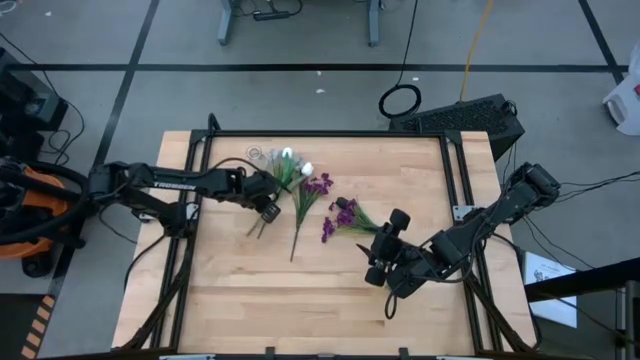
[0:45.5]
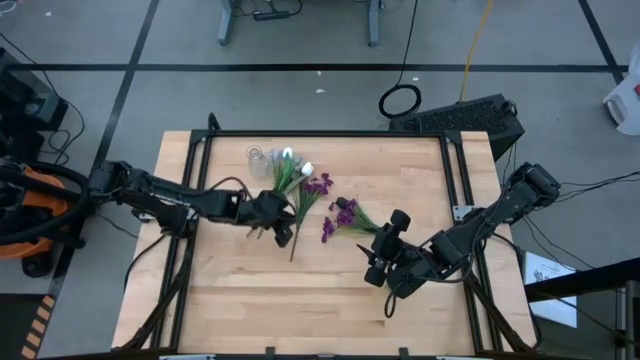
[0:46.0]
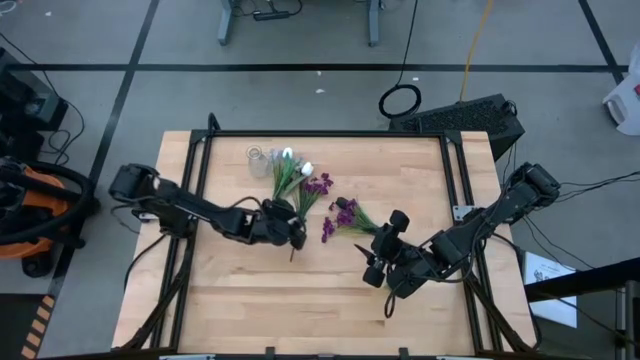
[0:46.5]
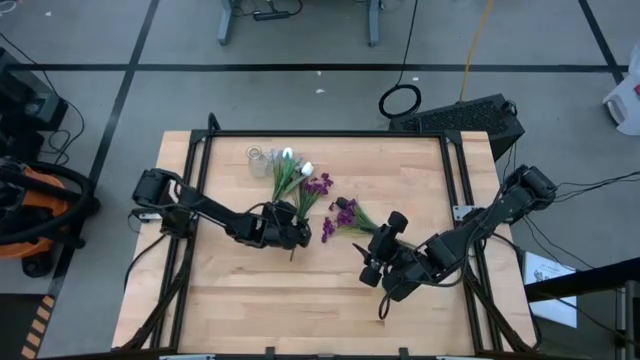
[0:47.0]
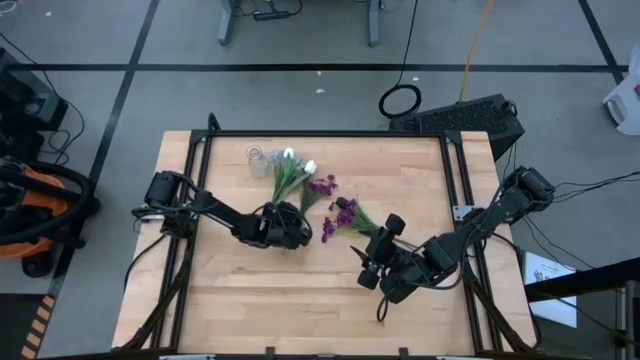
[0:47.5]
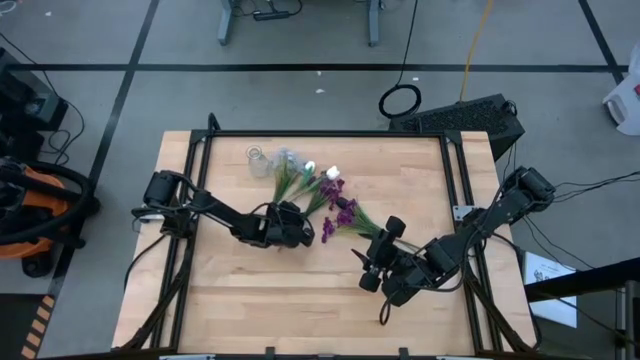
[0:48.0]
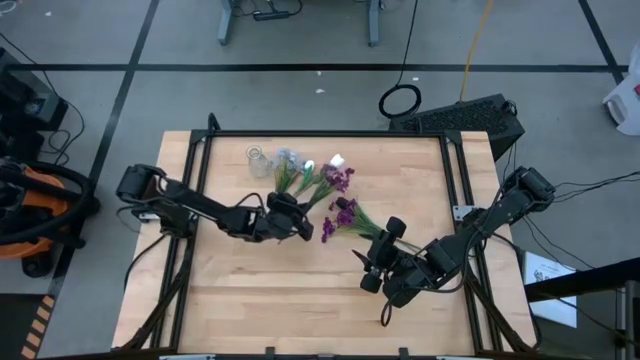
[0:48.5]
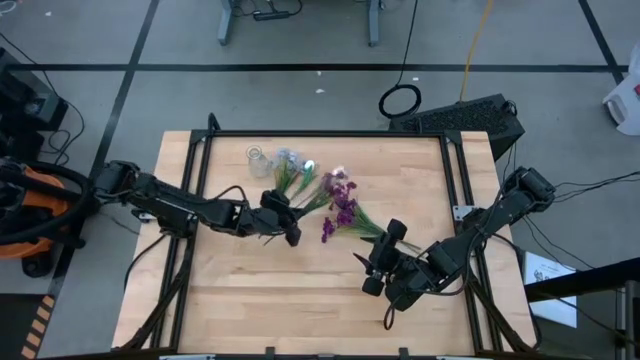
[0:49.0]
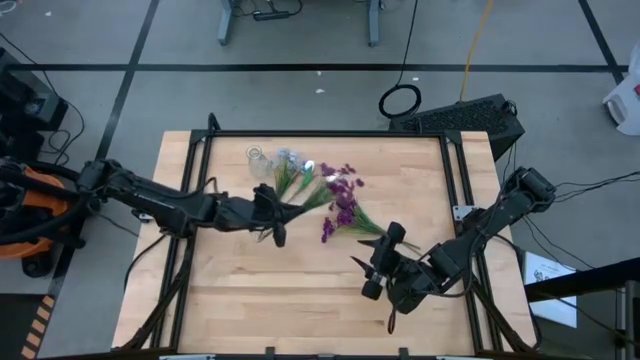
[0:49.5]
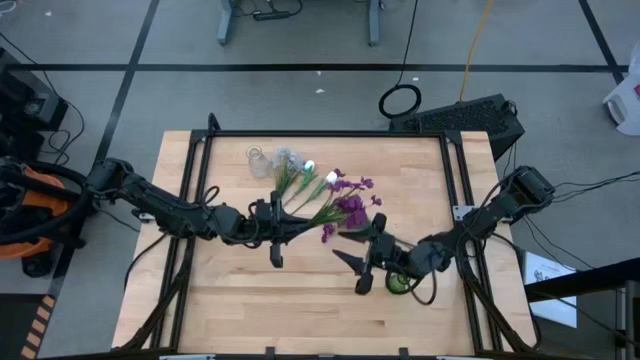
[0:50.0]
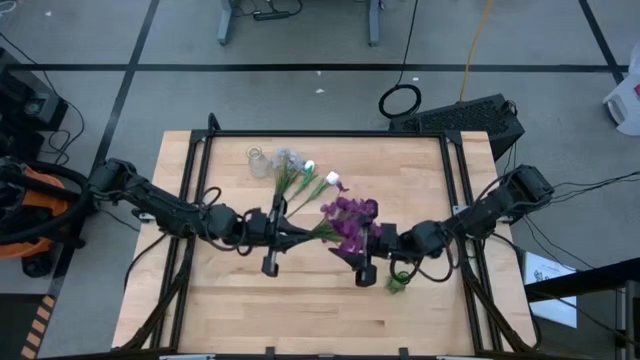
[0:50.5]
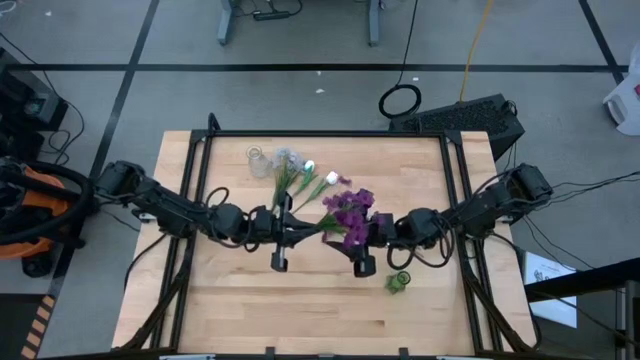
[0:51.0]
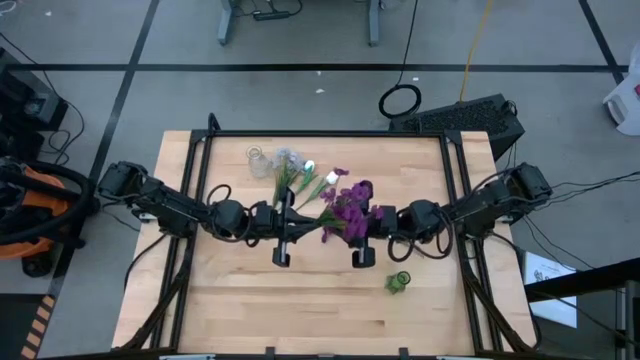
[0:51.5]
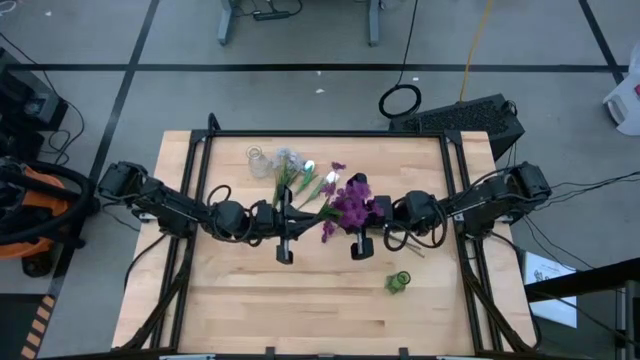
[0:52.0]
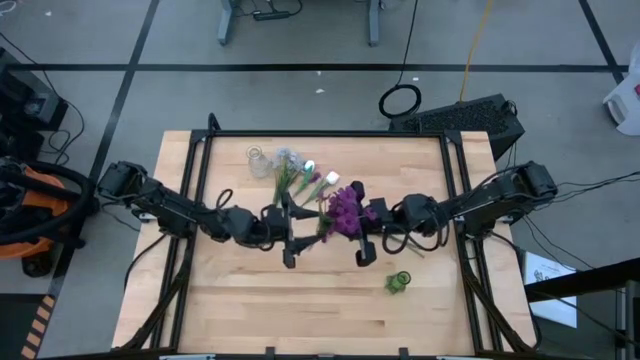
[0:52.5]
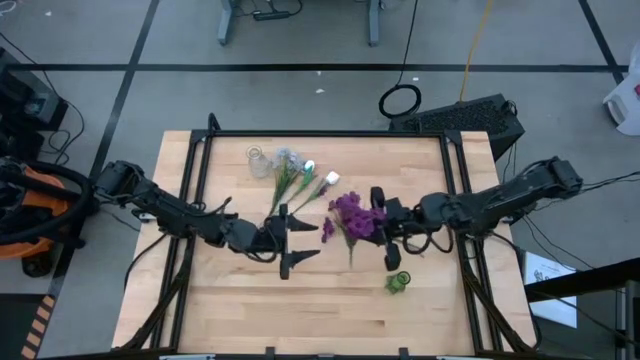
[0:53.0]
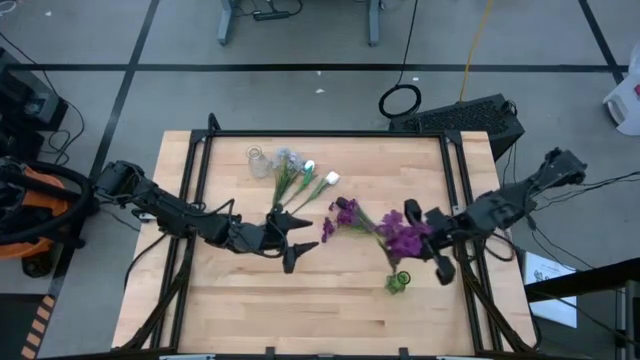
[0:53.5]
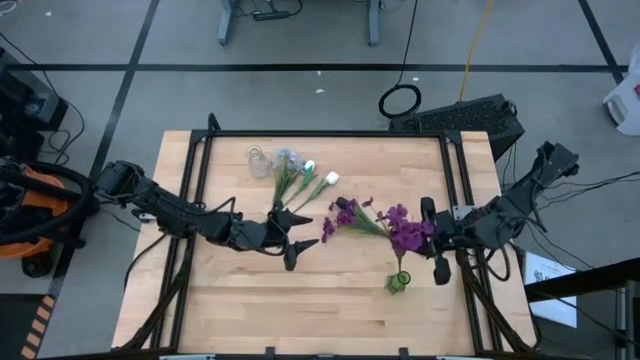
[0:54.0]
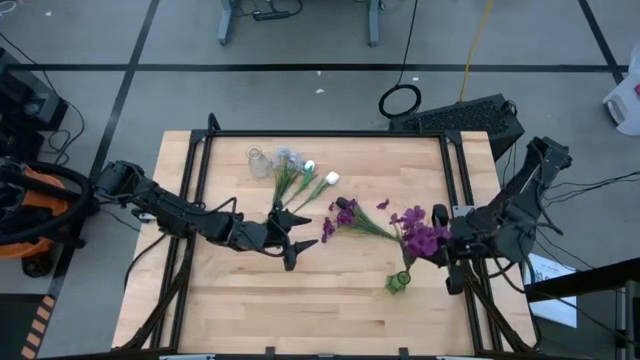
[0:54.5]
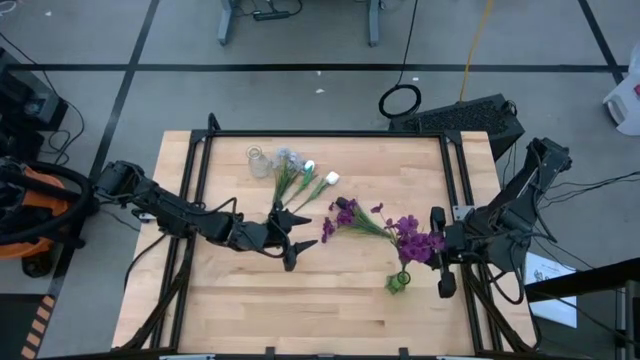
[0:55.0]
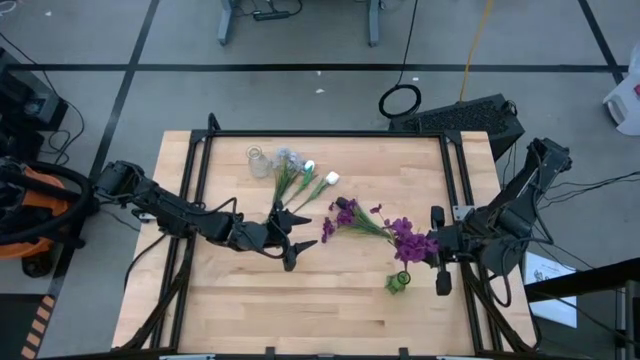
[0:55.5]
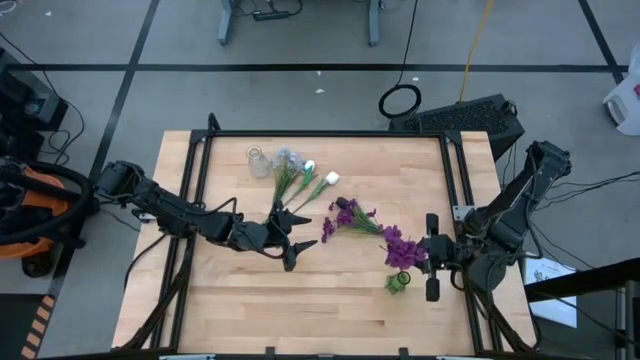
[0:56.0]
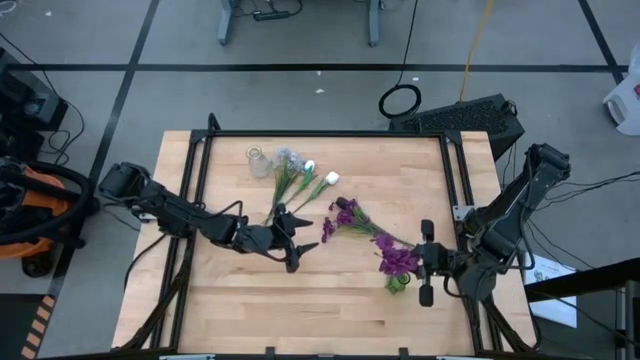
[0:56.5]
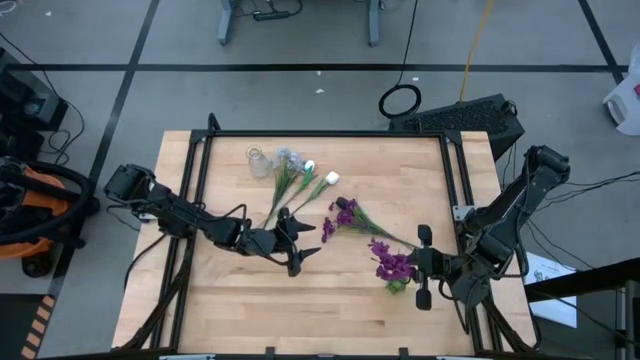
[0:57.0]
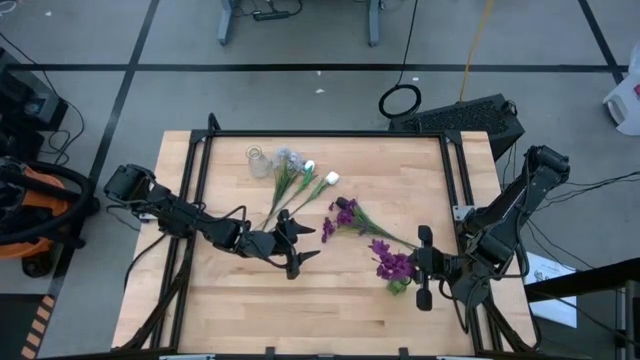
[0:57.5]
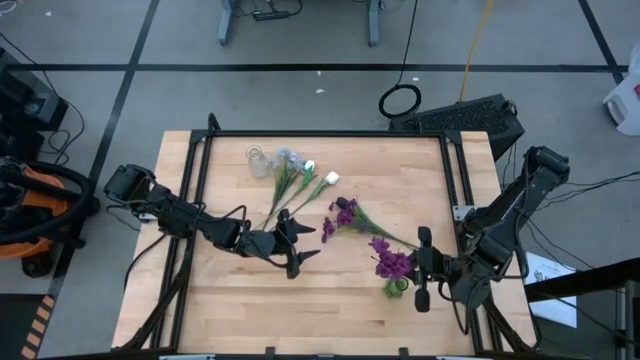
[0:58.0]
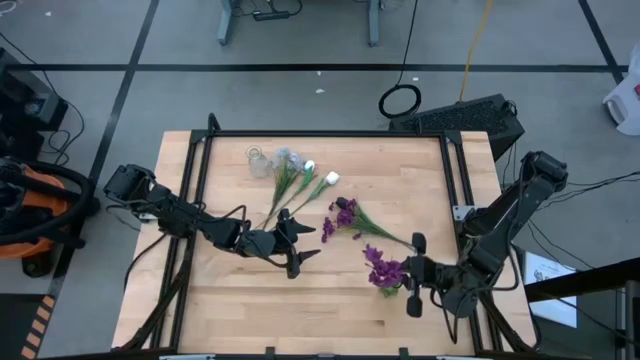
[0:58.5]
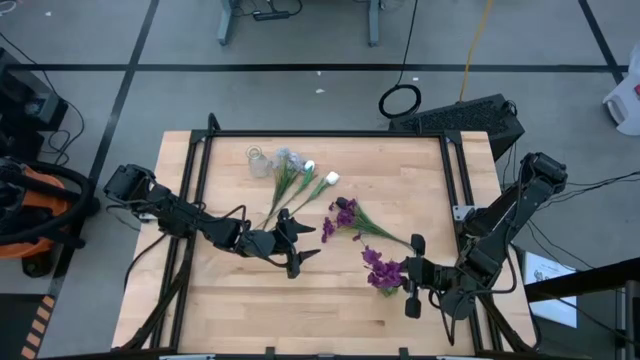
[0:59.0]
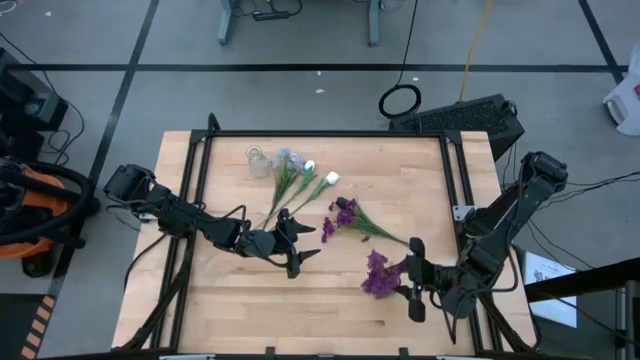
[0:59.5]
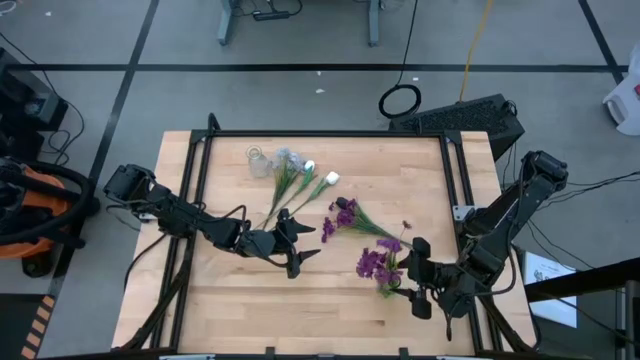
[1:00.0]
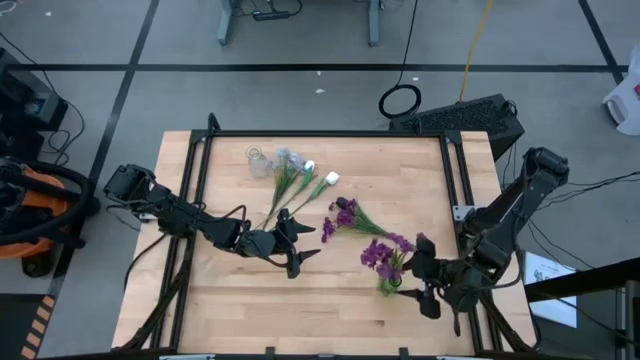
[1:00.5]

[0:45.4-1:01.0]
Task: Sort flowers into vase by color
Put the left purple flower into the green vase

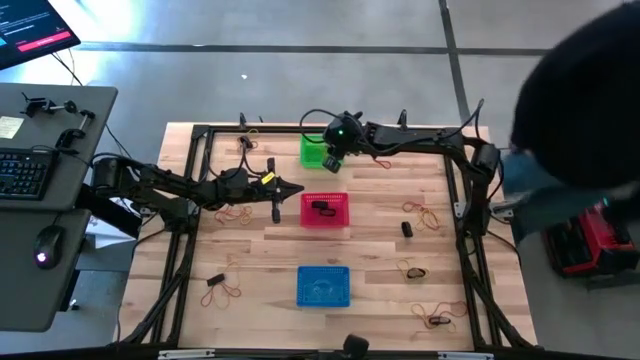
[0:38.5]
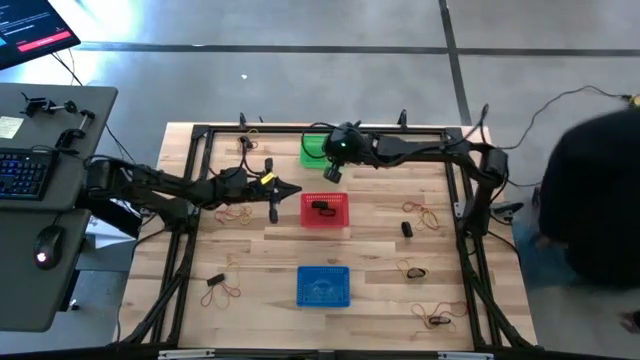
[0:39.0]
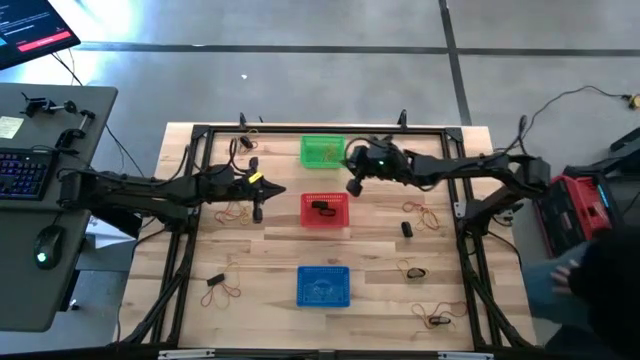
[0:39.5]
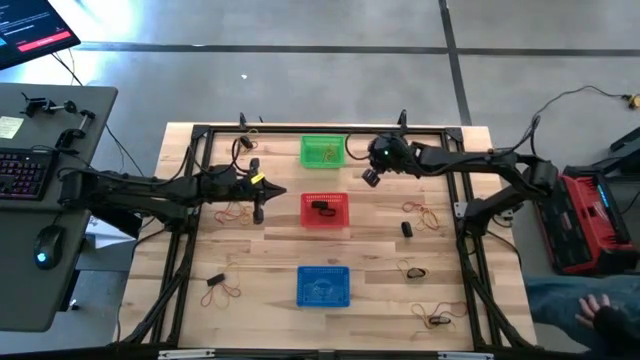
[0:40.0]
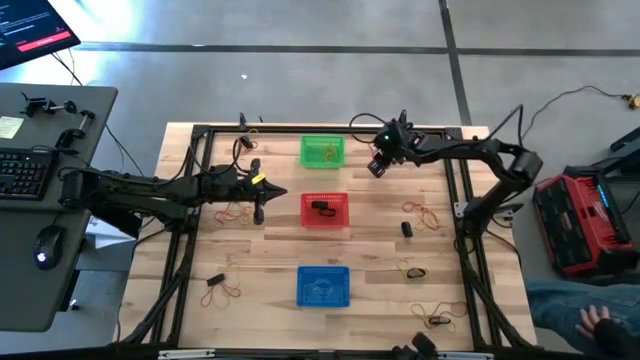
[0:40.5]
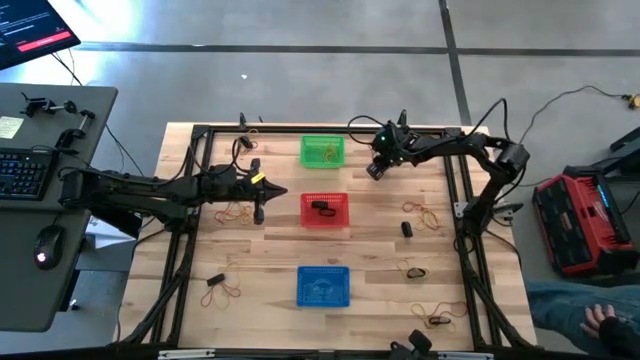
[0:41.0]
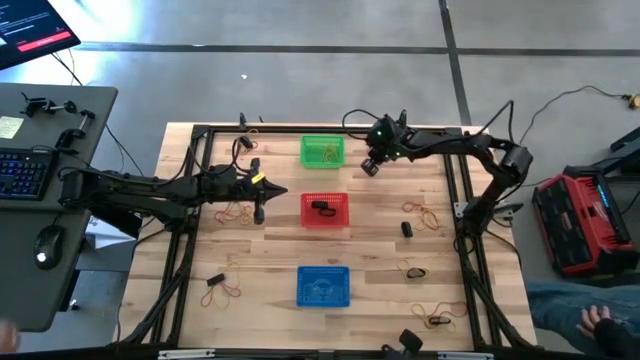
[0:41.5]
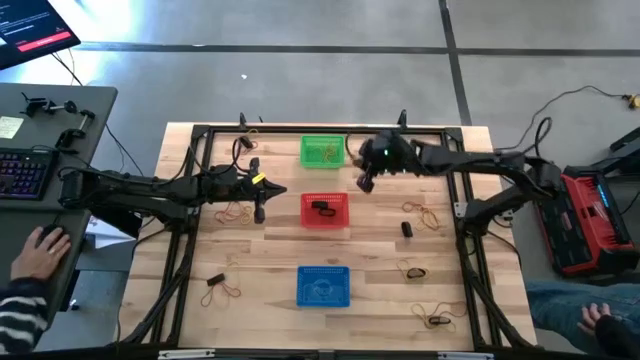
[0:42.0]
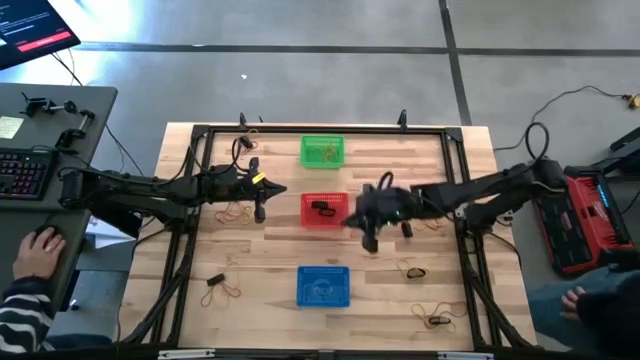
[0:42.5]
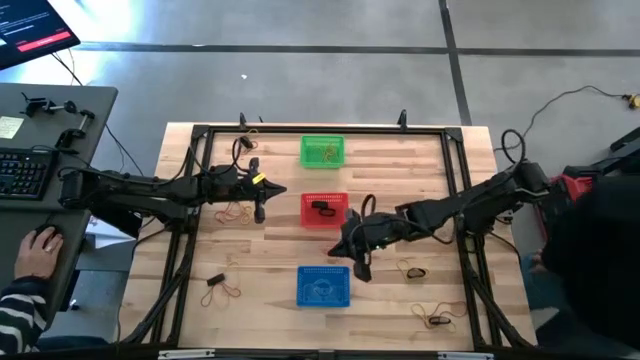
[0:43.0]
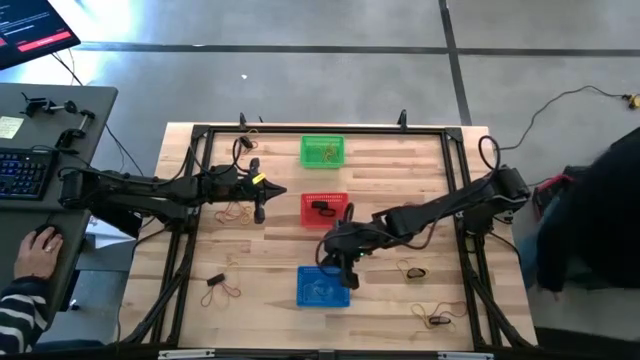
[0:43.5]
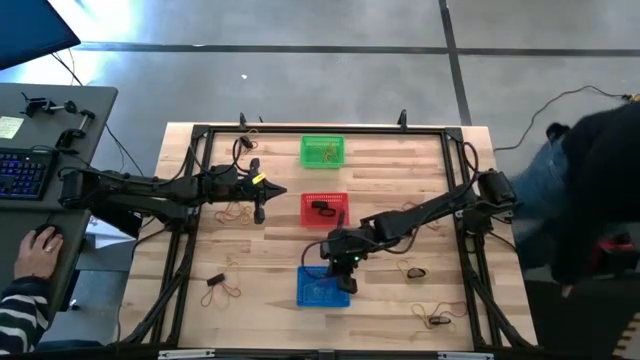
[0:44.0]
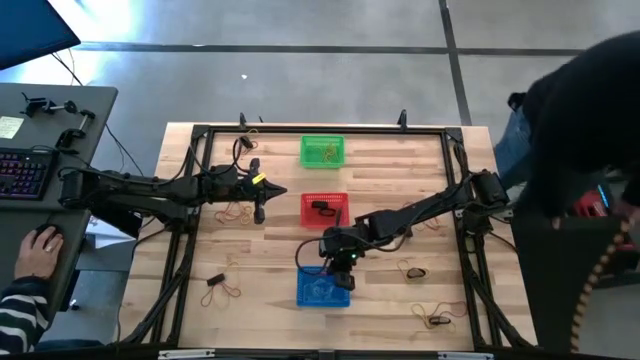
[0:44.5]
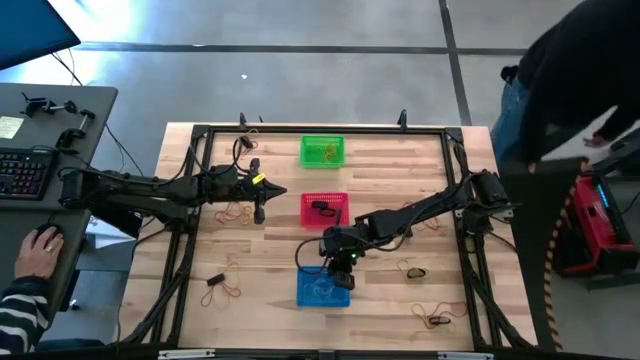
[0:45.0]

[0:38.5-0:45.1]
Task: Sort rubber bands into baskets
Put the red rubber band into the blue bin
